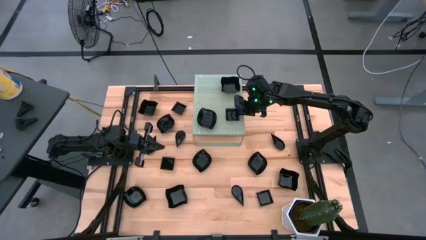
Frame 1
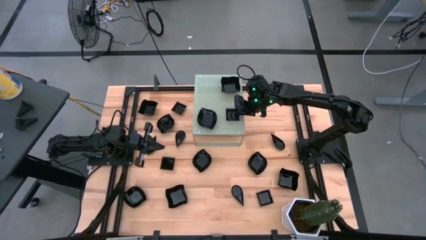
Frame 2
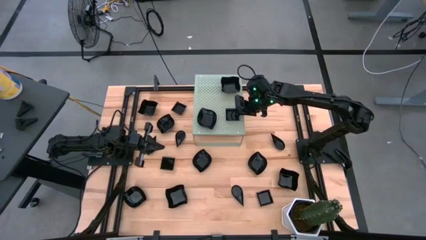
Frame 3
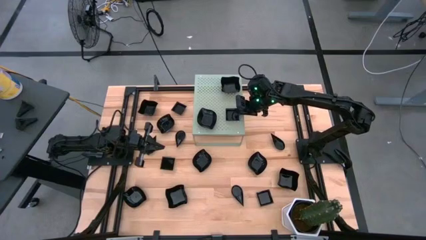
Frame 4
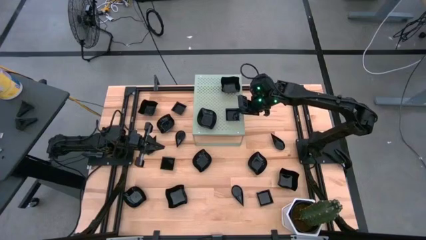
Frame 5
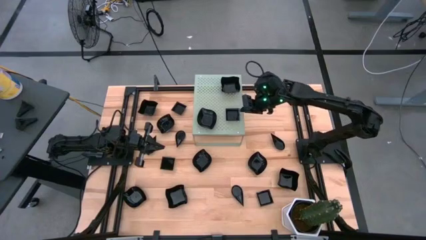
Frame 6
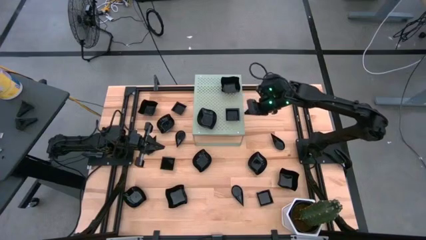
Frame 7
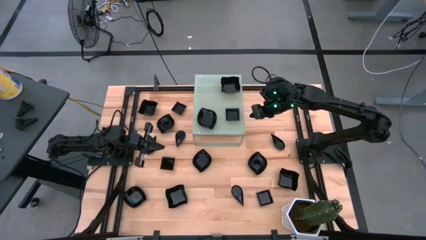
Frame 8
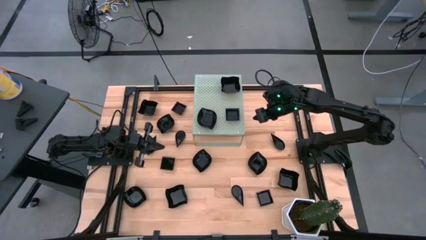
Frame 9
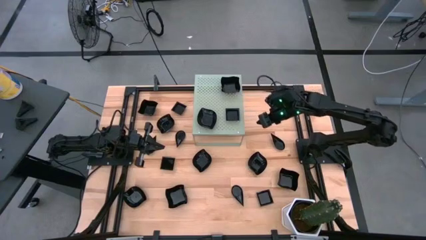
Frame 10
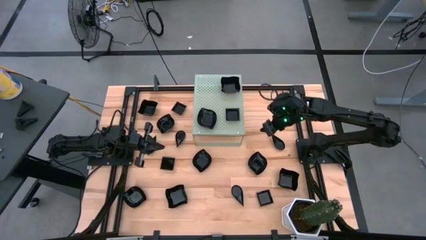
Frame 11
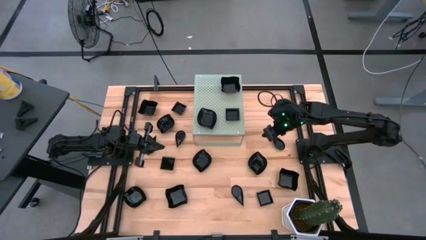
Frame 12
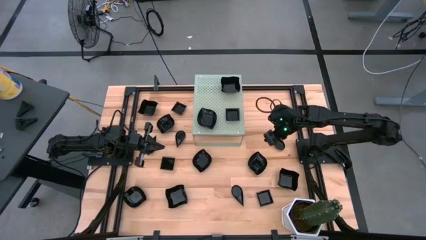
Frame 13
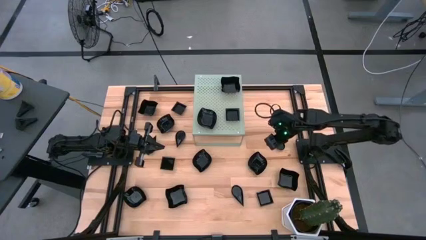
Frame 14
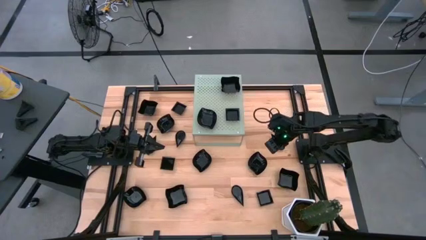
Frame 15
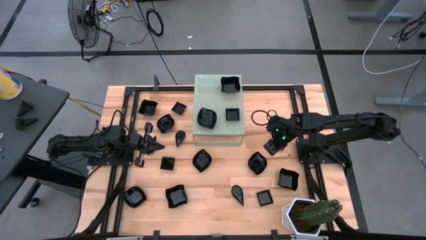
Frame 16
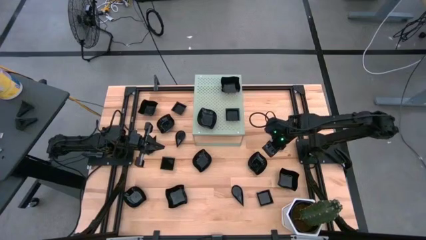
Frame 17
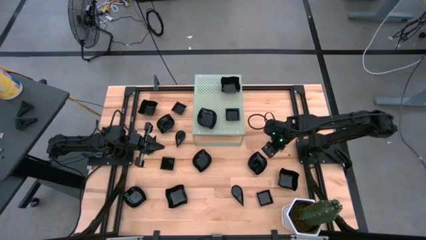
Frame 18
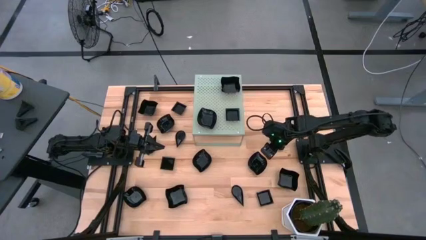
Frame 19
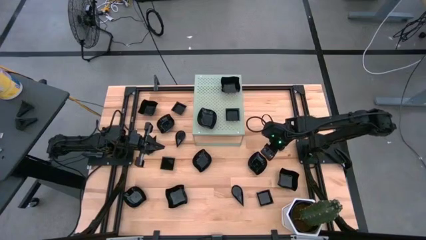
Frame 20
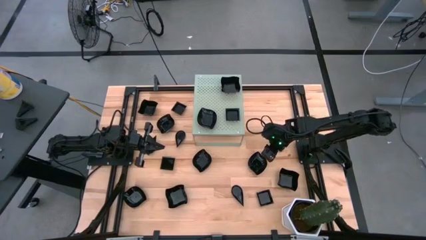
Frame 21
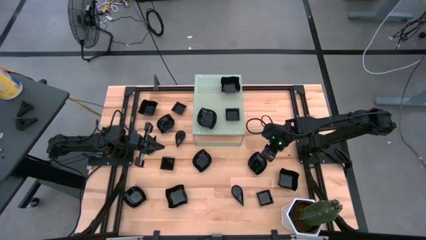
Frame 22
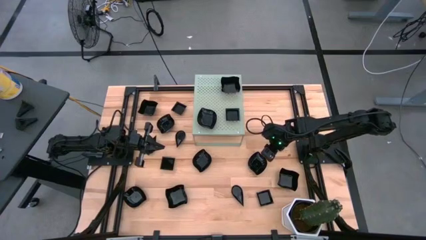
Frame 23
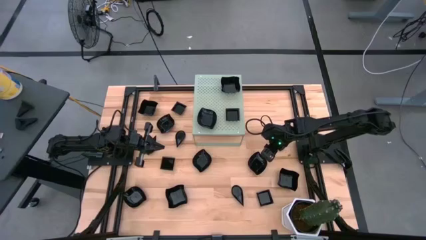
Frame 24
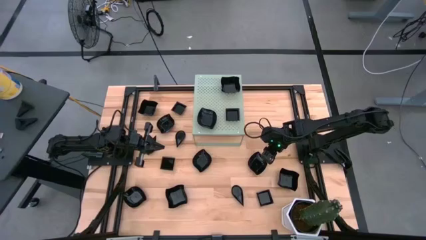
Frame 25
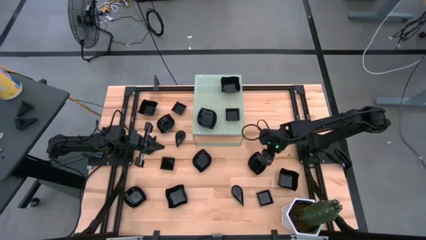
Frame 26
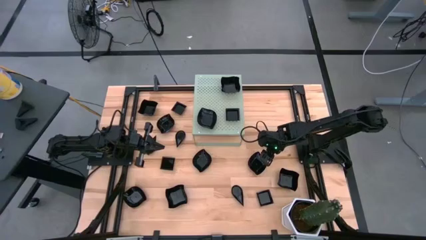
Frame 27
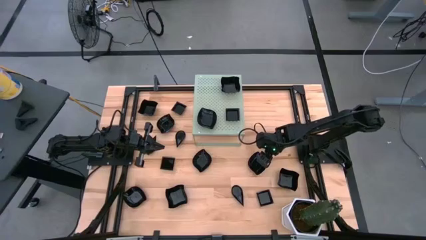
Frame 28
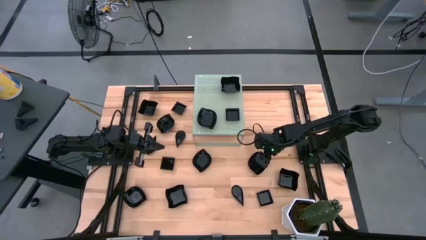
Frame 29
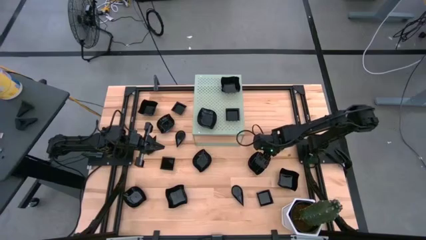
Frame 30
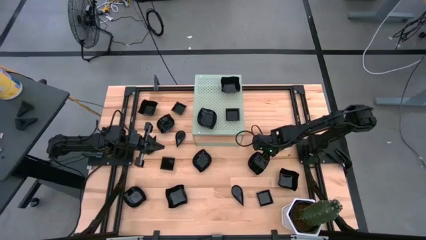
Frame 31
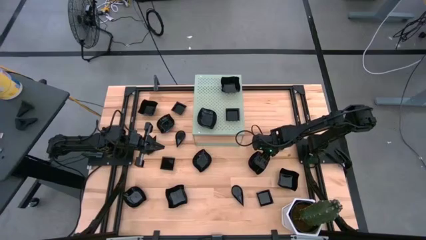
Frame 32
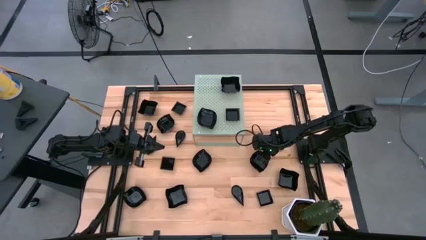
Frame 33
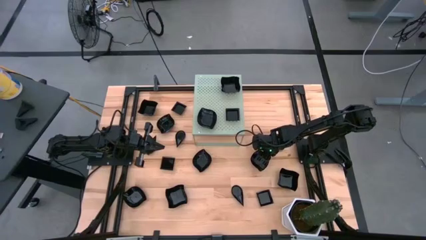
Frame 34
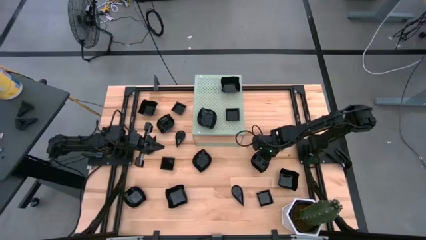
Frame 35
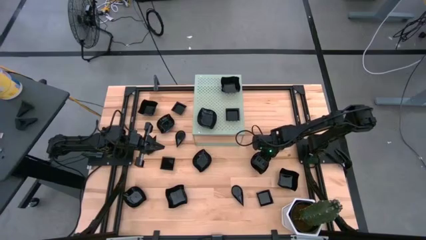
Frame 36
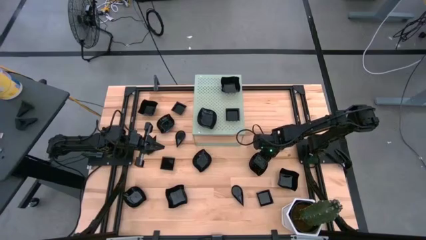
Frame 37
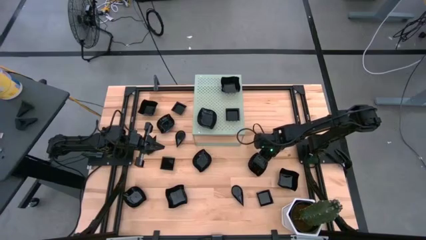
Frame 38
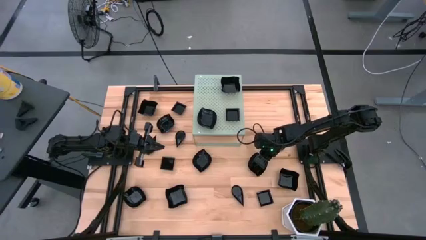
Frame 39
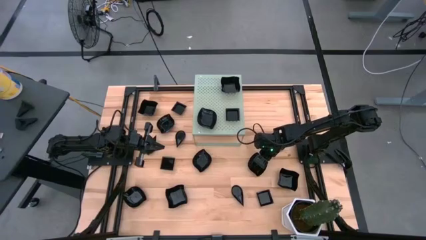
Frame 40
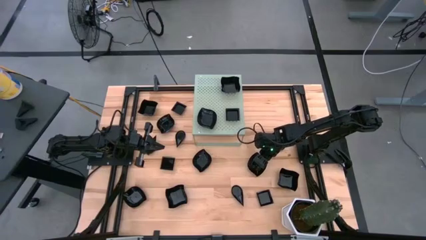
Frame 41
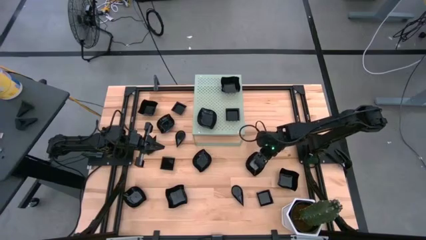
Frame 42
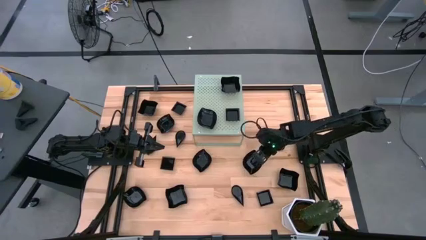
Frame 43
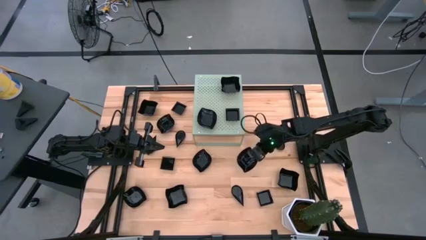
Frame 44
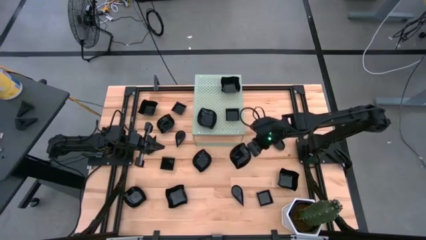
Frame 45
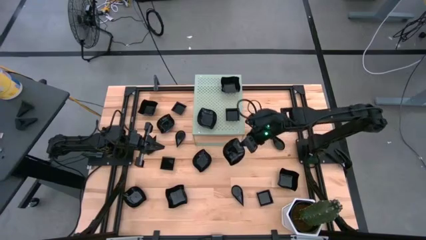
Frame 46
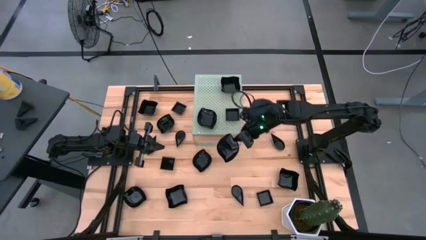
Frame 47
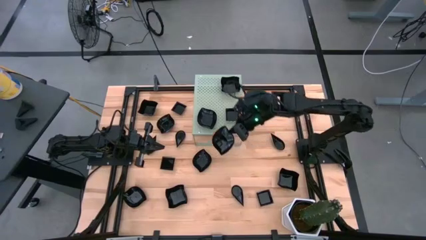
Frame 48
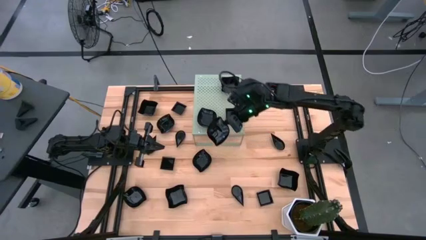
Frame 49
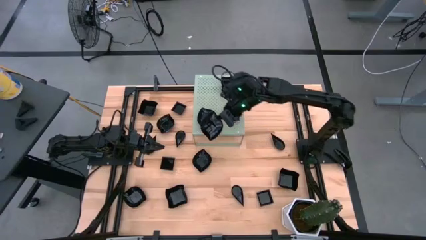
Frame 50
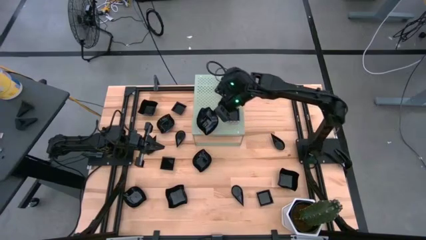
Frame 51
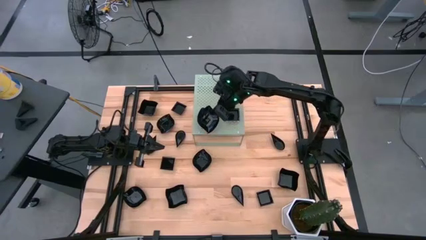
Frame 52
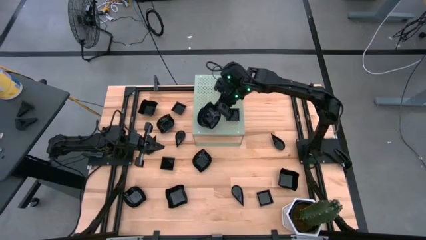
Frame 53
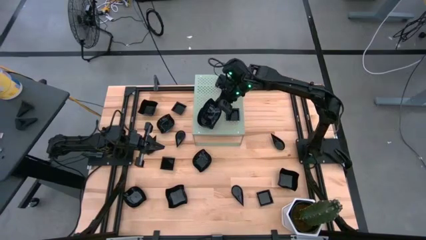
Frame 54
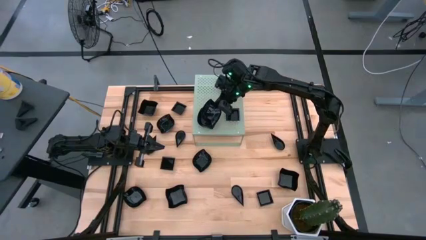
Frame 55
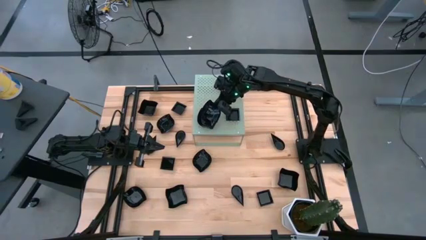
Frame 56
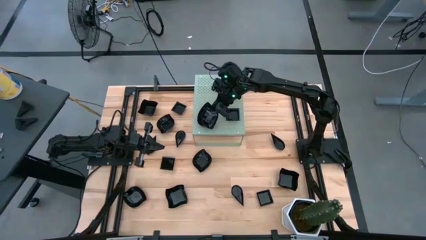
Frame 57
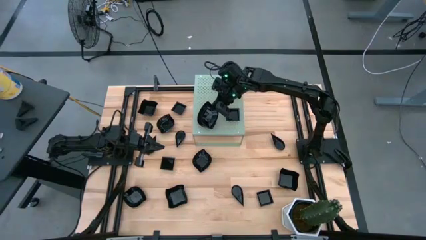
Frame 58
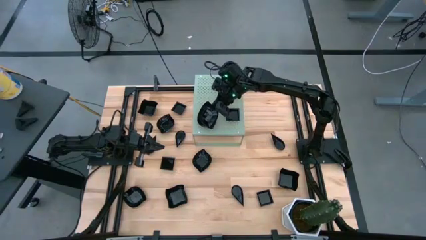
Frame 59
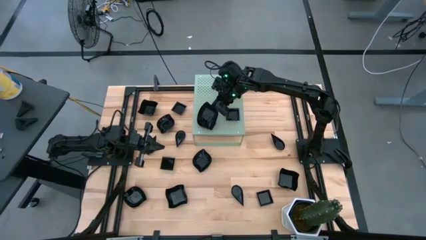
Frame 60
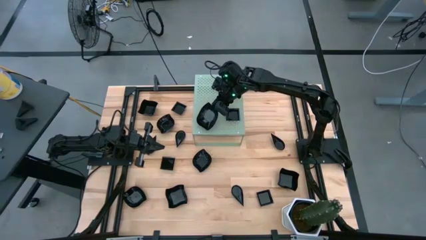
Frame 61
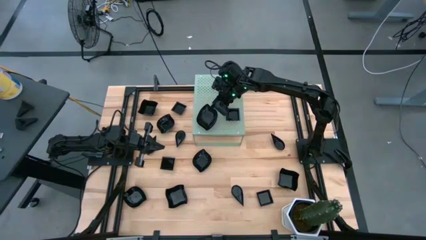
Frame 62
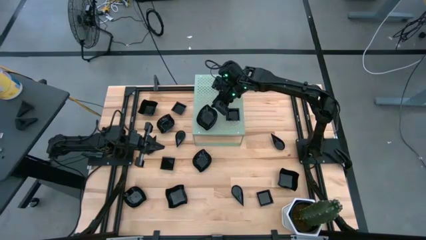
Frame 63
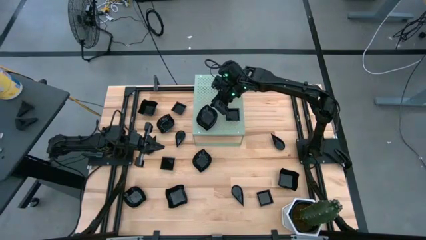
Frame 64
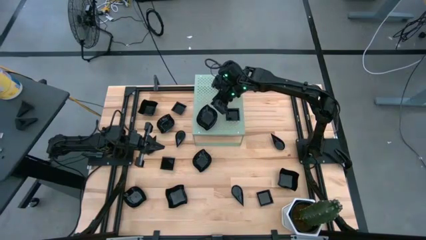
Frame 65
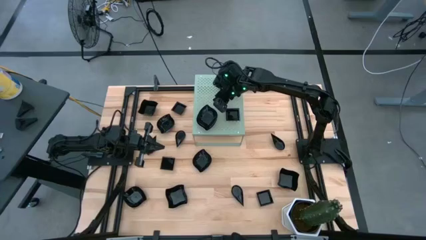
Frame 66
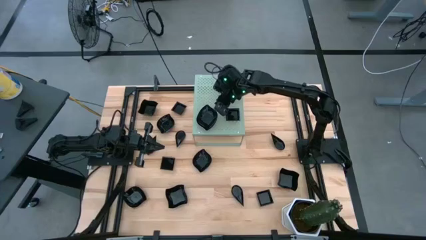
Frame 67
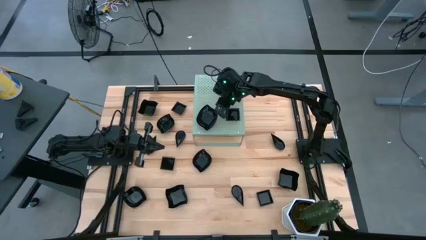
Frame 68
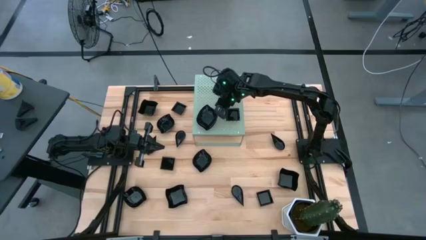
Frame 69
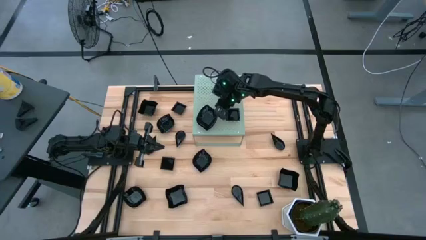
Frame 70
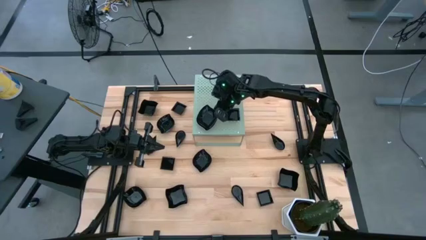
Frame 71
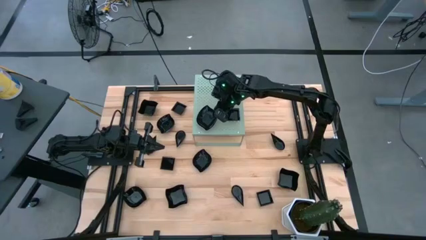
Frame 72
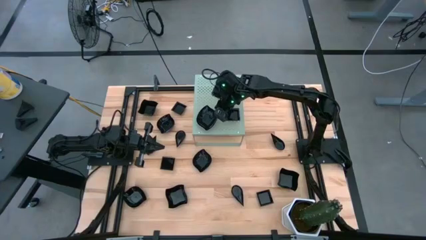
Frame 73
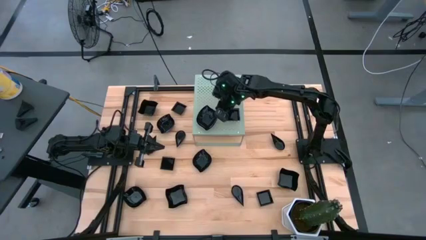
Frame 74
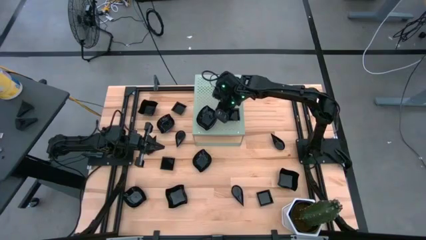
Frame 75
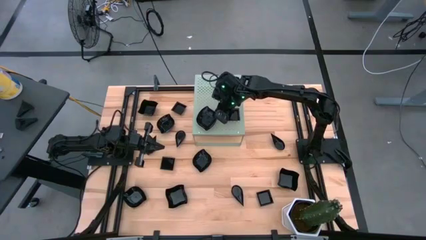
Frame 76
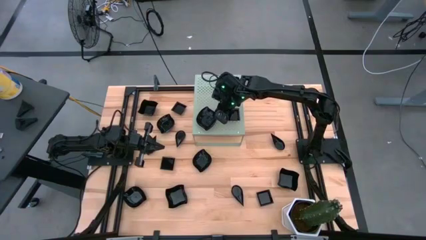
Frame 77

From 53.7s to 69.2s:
Task: Pick & Place Mini shaped plates
Stack the leaf shaped plate on top of the leaf shaped plate on the shelf
